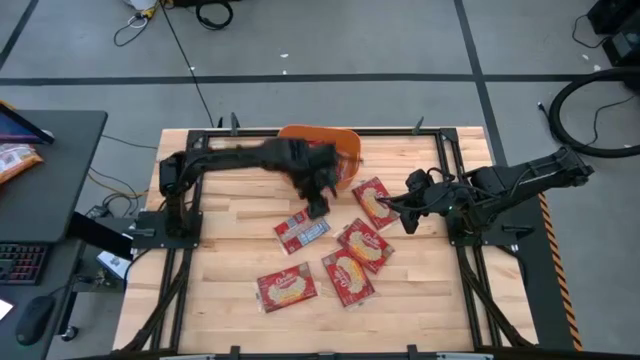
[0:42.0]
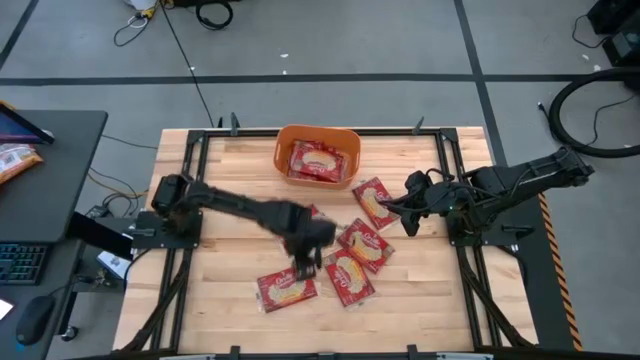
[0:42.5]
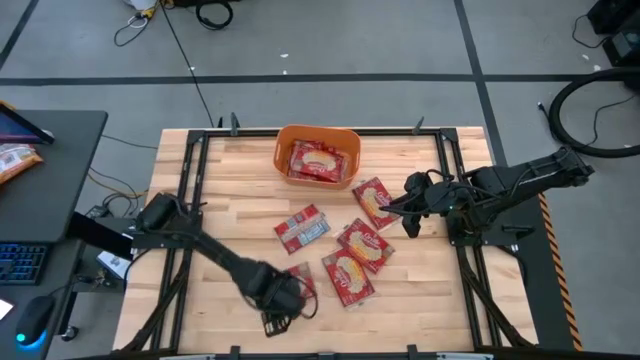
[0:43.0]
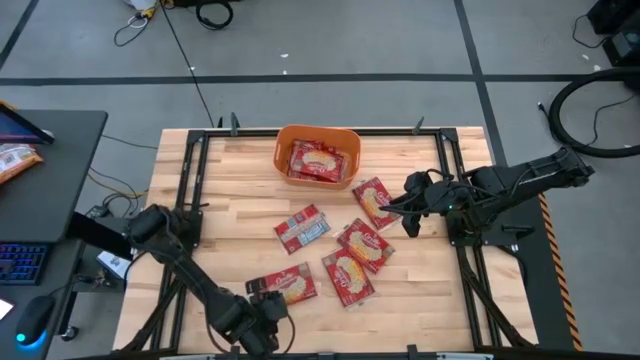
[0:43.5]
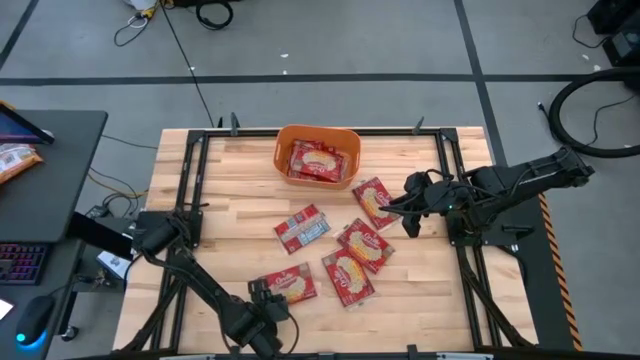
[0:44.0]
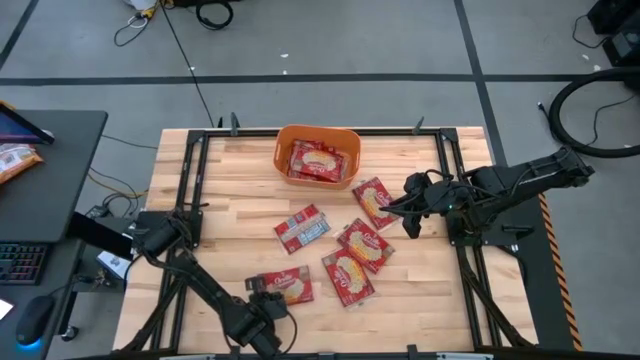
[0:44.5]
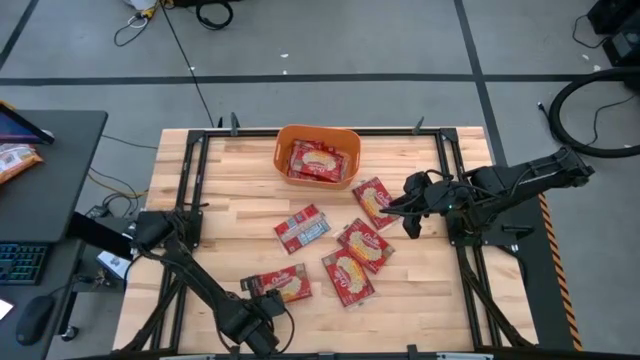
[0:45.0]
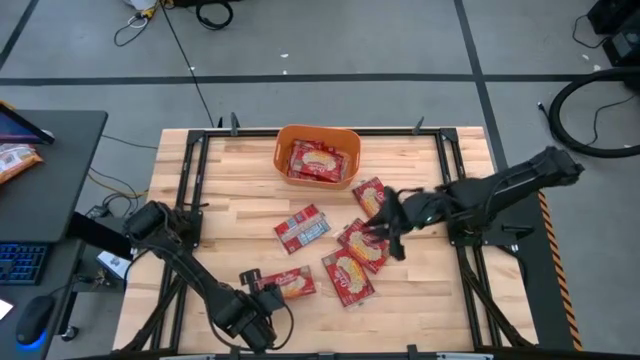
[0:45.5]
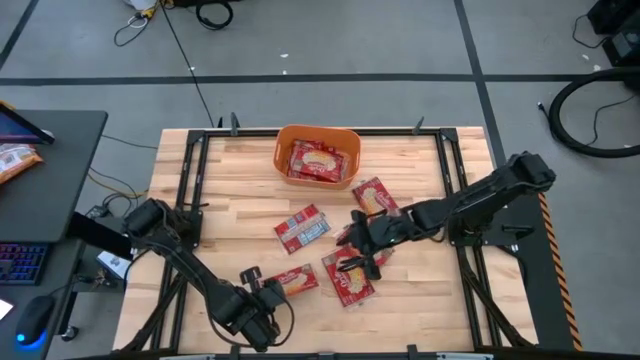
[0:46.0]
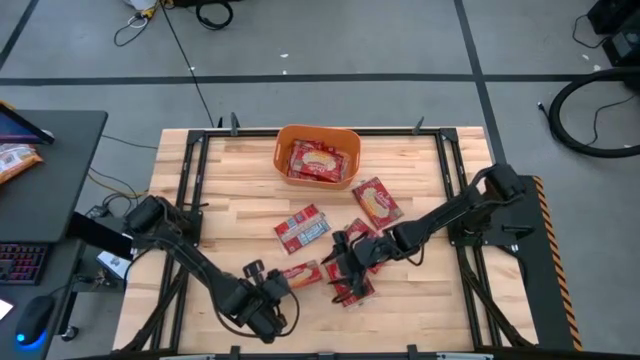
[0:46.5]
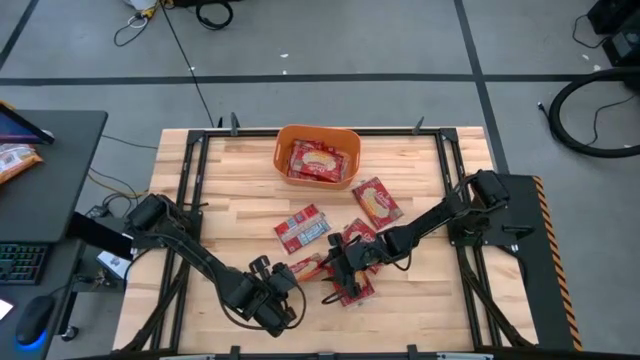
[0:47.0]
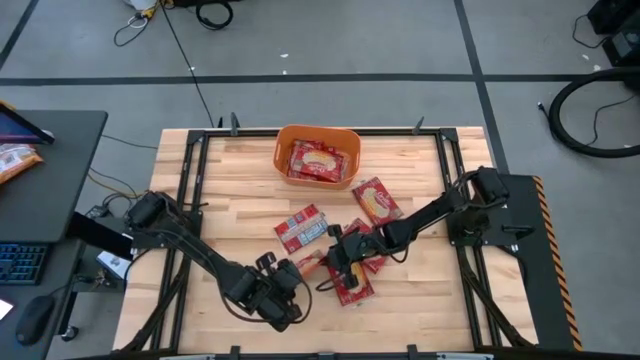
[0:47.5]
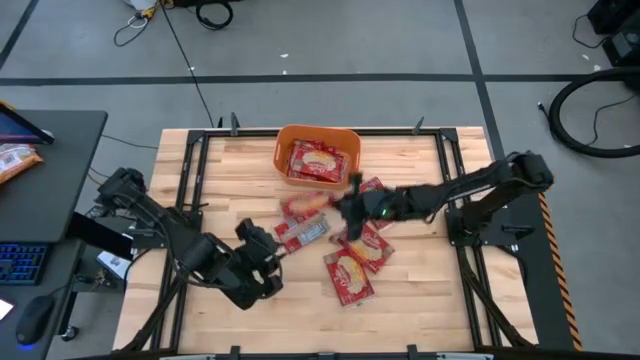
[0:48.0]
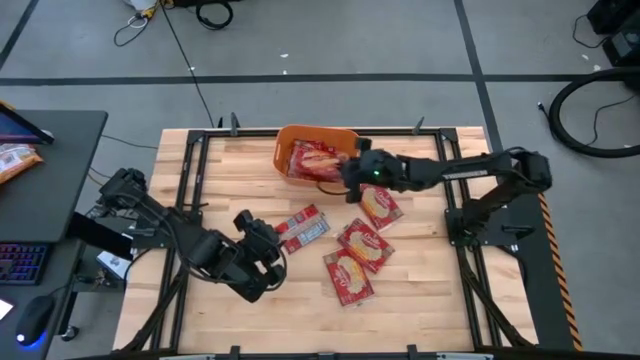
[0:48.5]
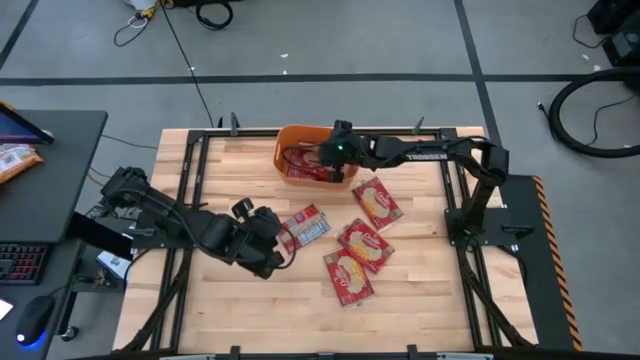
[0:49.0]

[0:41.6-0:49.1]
Task: Sort popcorn bags into baskets
Put the popcorn bag into the orange bin

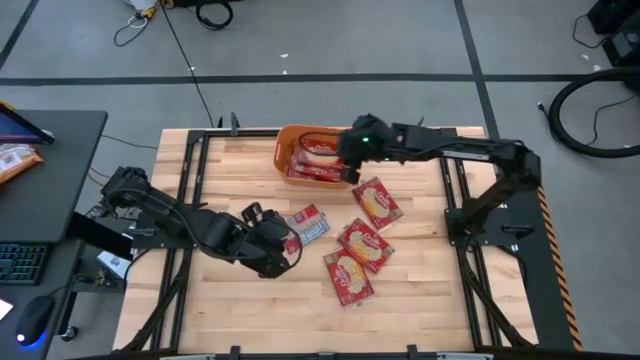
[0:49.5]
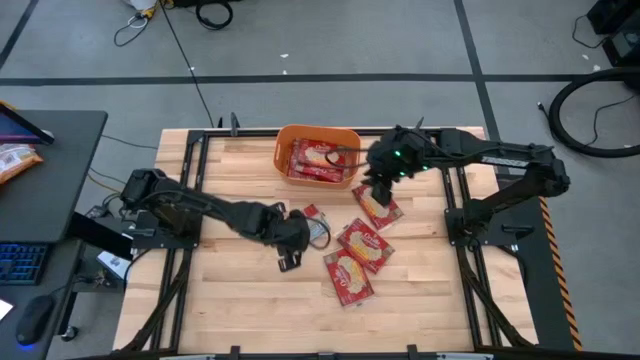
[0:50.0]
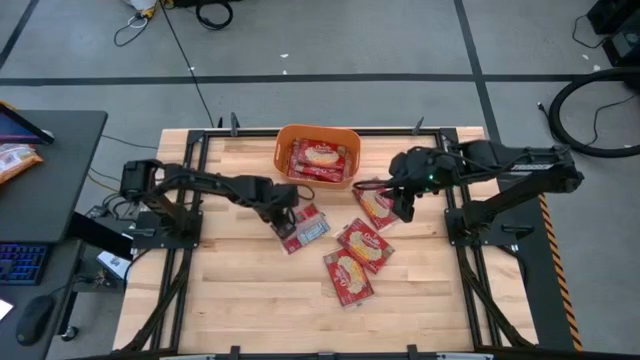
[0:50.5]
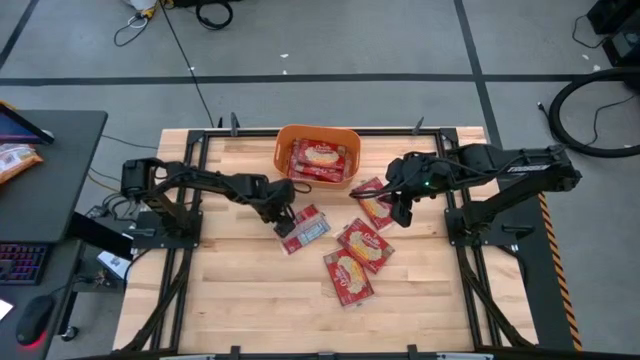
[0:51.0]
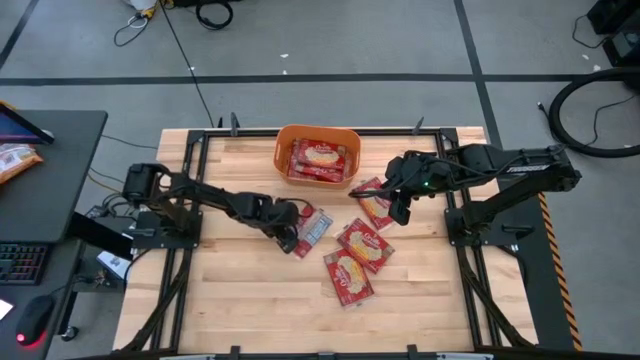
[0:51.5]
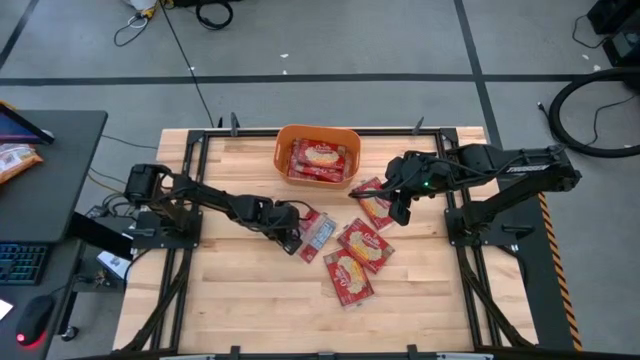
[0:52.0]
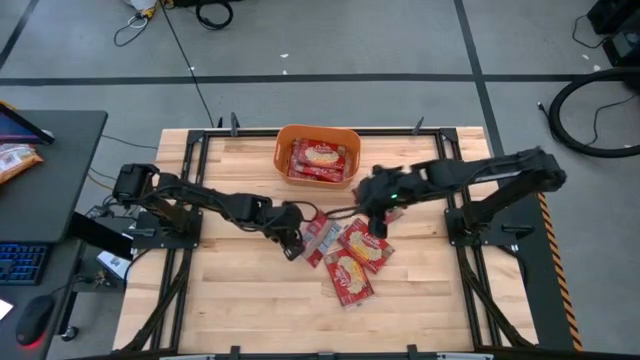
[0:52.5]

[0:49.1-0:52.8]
Put the popcorn bag into the orange bin

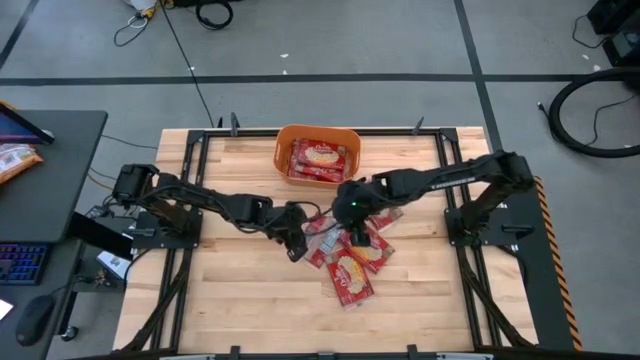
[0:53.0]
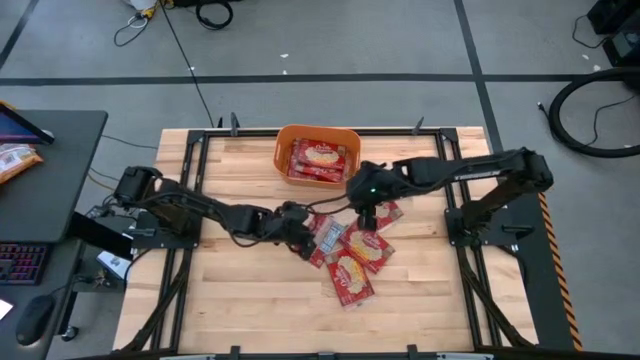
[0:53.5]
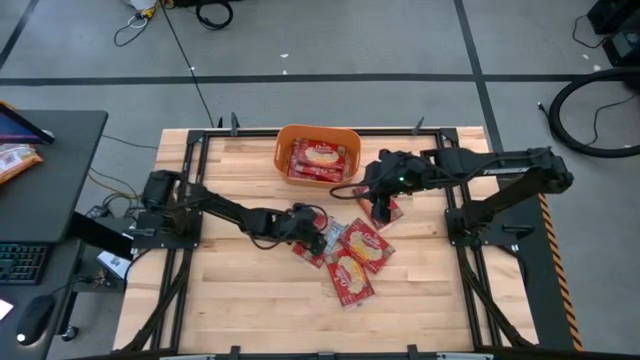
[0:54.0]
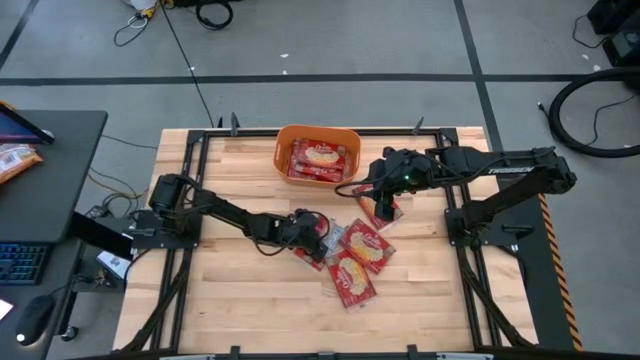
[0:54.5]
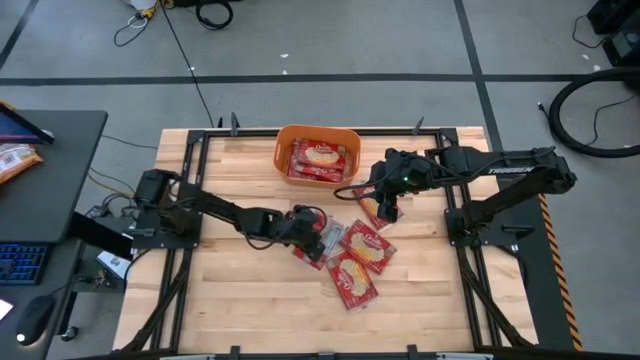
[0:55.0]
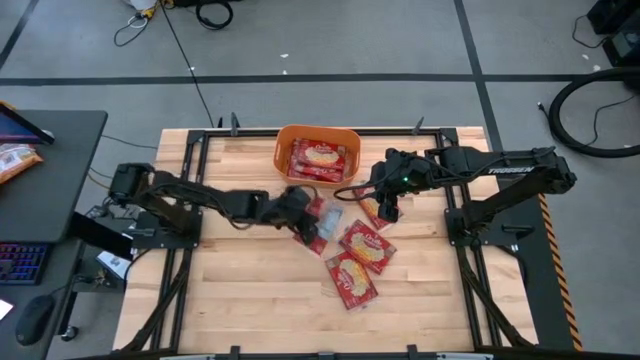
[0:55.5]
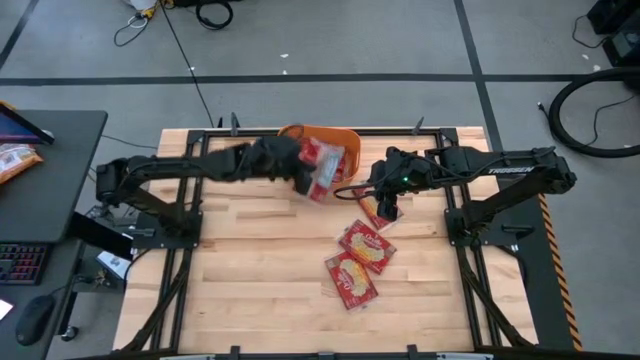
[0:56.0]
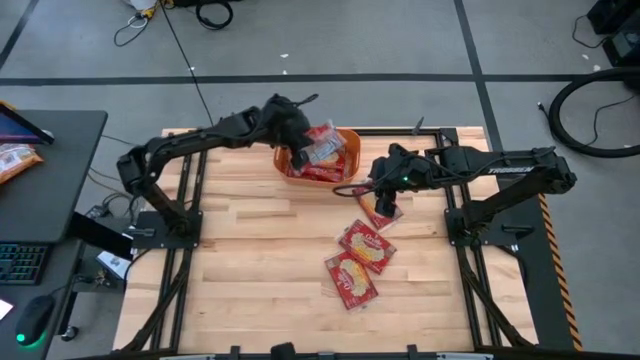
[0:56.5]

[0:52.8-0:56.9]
Put the popcorn bag into the orange bin

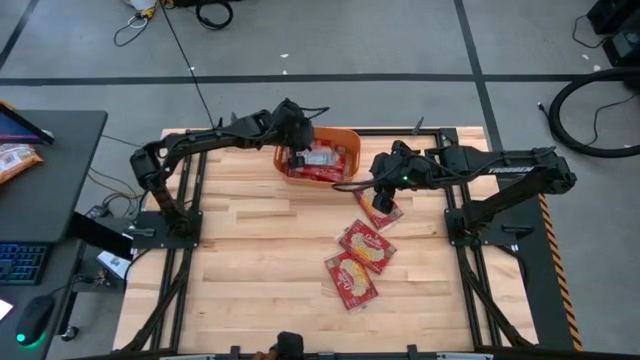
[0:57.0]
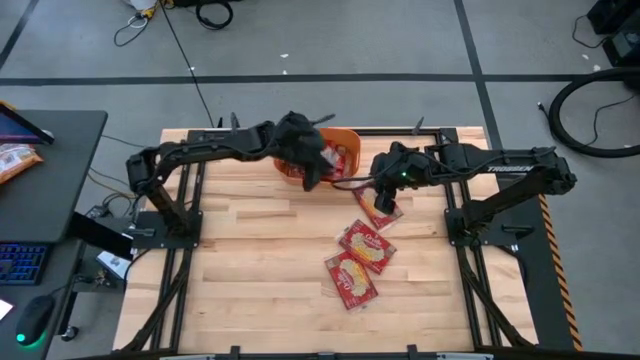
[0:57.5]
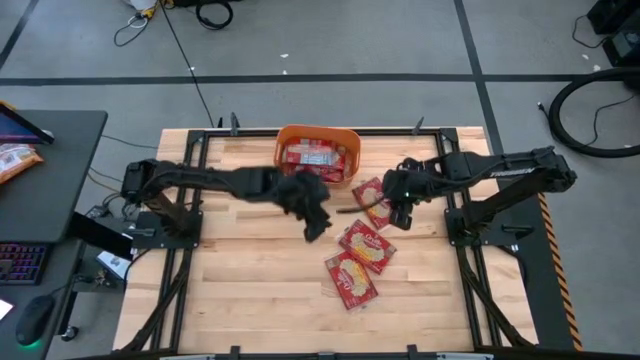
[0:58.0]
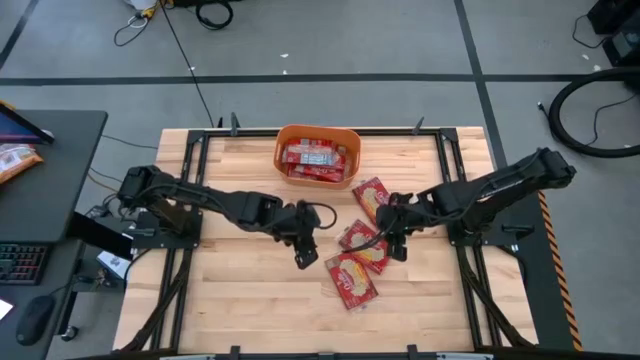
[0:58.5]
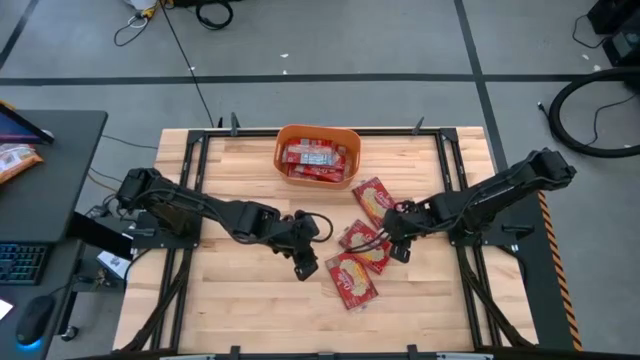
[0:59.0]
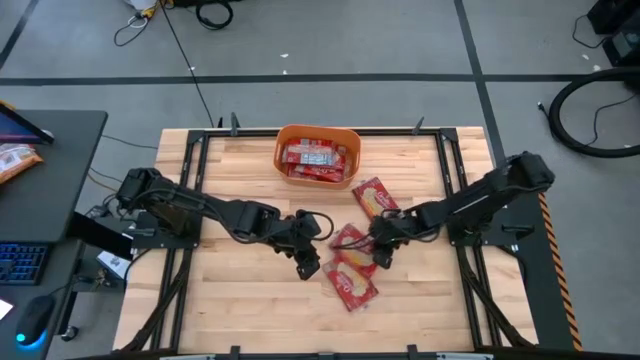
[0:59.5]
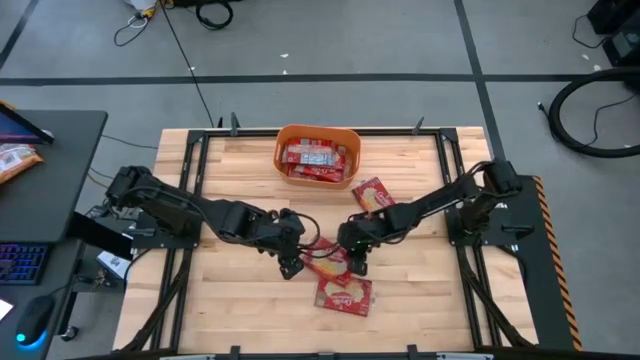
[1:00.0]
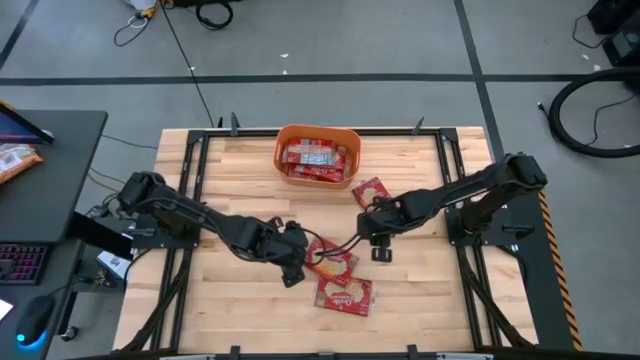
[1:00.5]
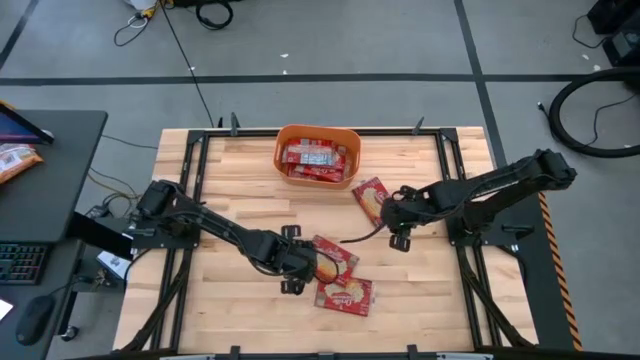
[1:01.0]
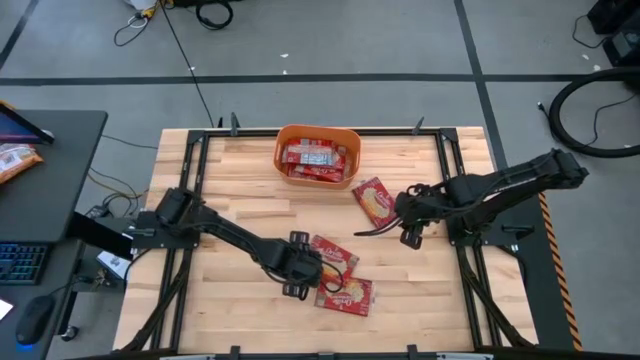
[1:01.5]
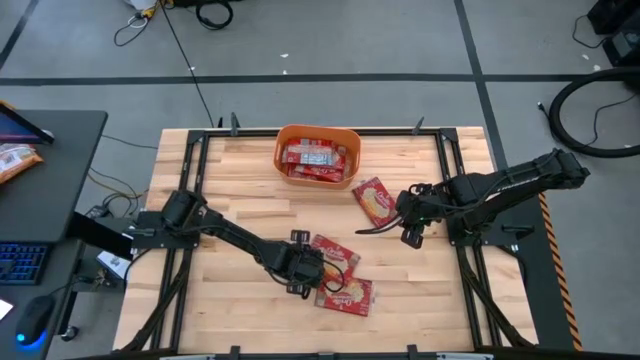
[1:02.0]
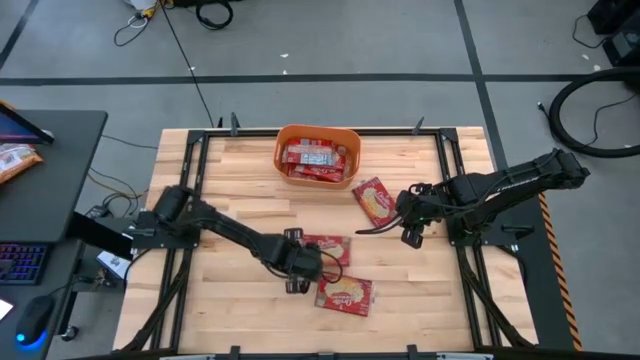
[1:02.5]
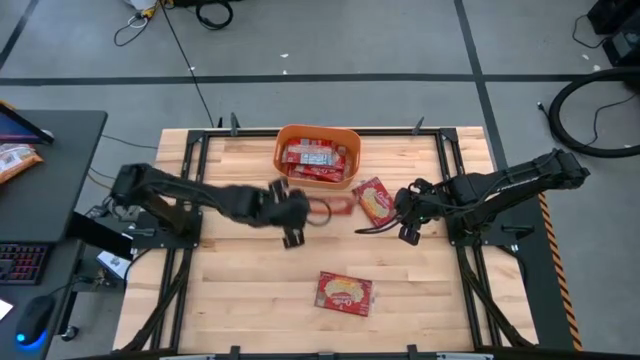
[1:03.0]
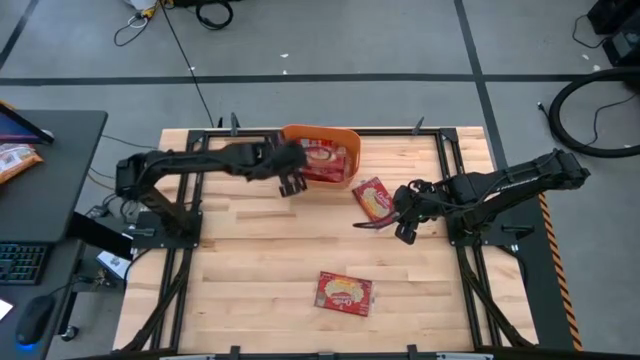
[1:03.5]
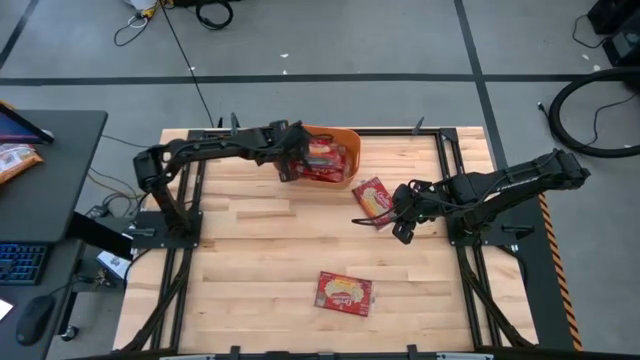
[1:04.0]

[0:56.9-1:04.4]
Put the popcorn bag into the orange bin
